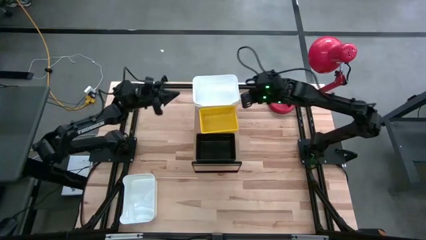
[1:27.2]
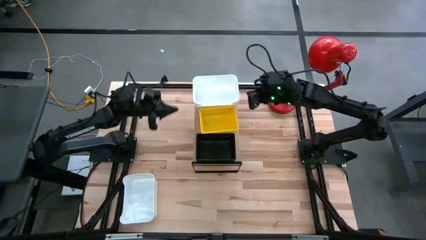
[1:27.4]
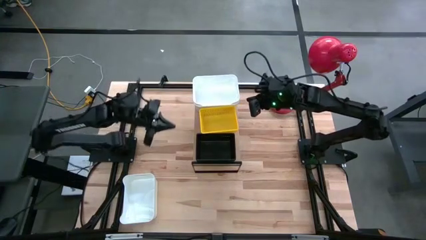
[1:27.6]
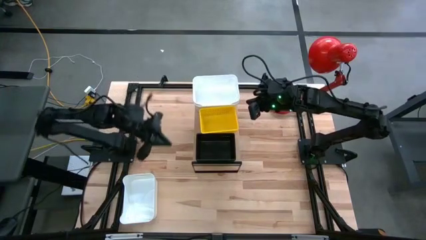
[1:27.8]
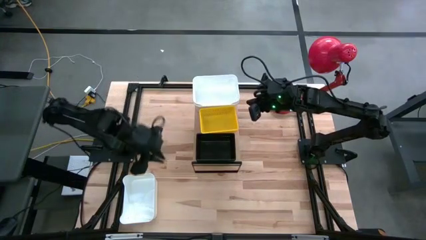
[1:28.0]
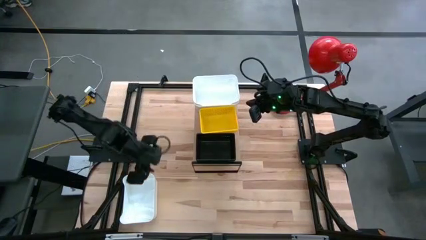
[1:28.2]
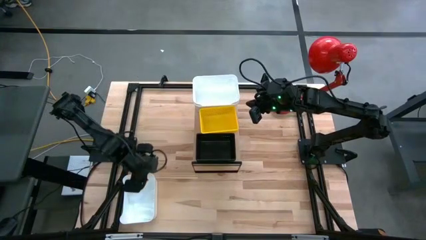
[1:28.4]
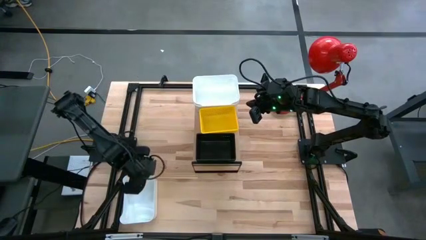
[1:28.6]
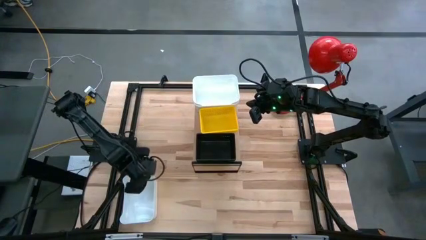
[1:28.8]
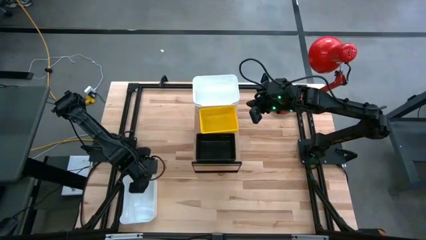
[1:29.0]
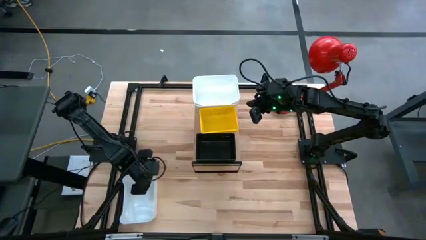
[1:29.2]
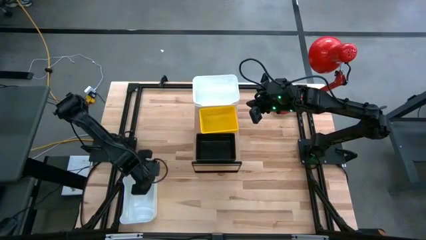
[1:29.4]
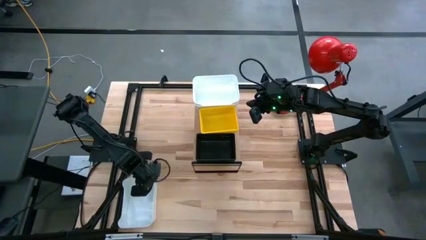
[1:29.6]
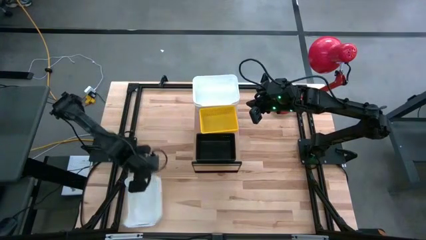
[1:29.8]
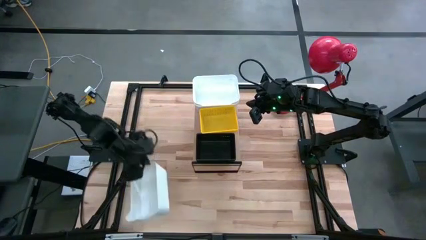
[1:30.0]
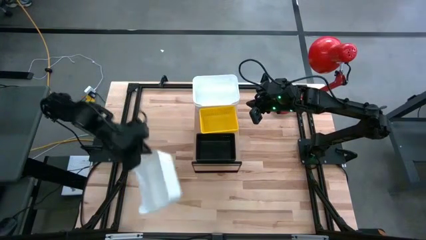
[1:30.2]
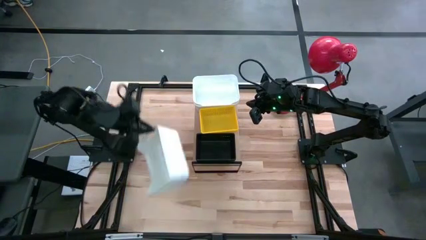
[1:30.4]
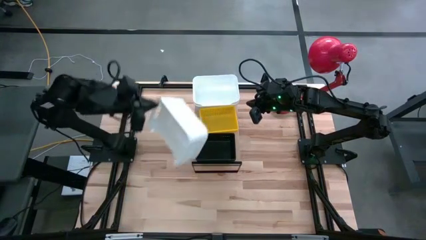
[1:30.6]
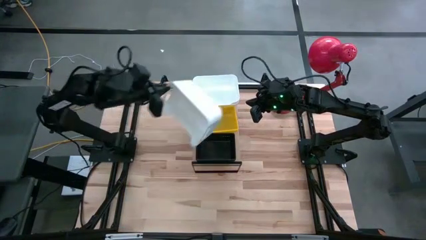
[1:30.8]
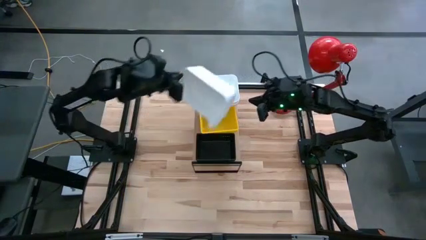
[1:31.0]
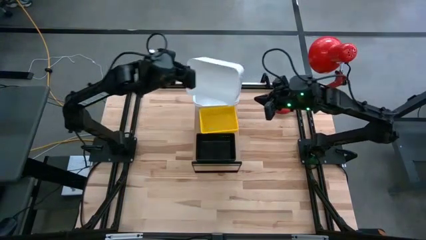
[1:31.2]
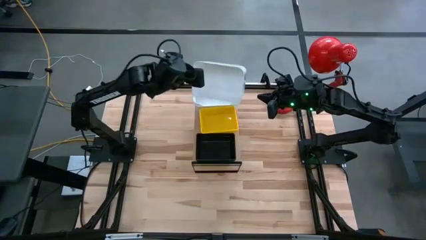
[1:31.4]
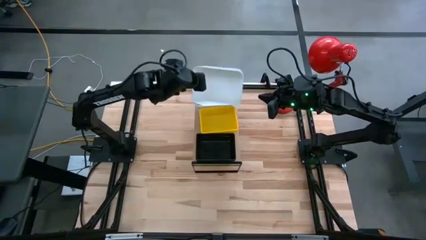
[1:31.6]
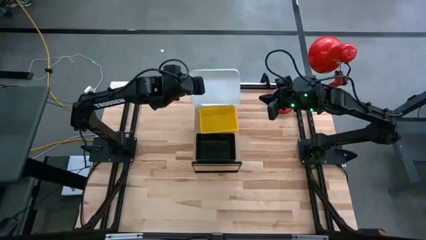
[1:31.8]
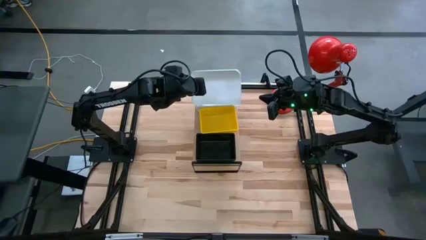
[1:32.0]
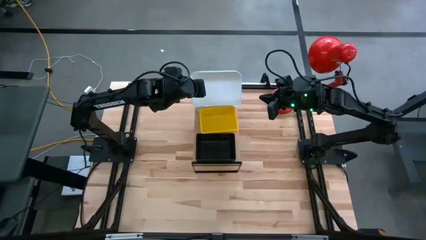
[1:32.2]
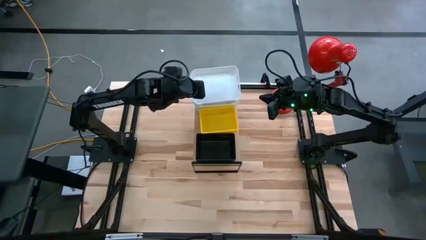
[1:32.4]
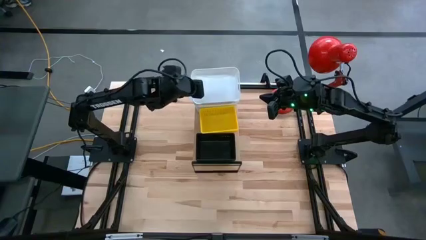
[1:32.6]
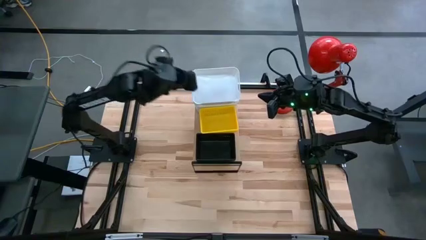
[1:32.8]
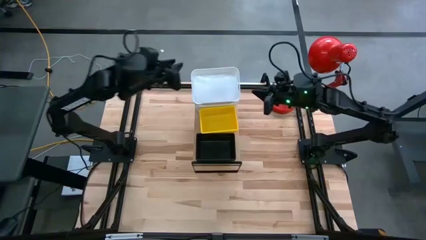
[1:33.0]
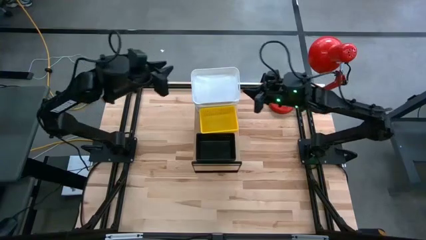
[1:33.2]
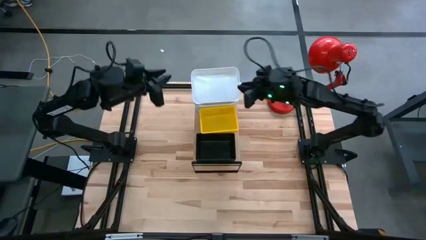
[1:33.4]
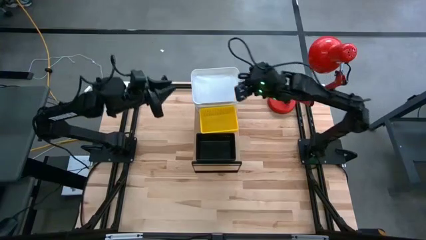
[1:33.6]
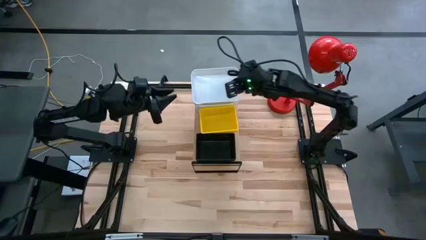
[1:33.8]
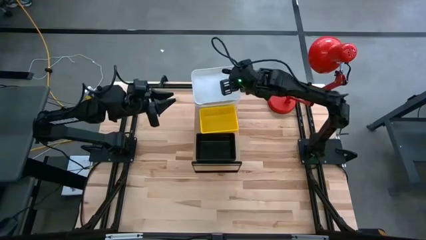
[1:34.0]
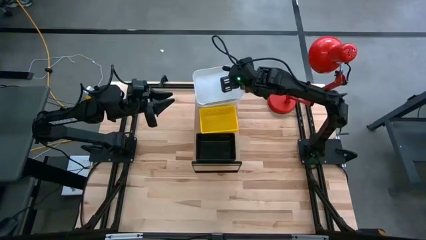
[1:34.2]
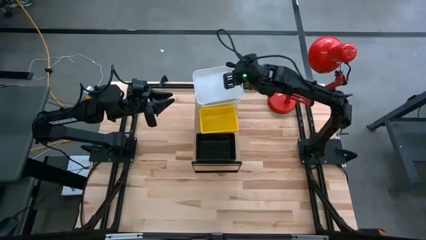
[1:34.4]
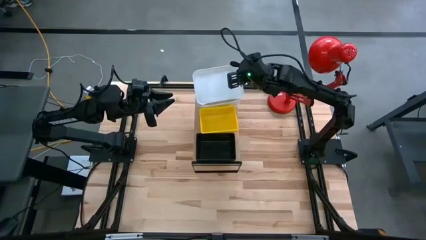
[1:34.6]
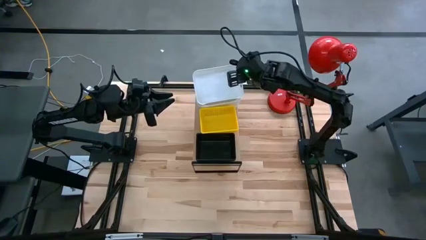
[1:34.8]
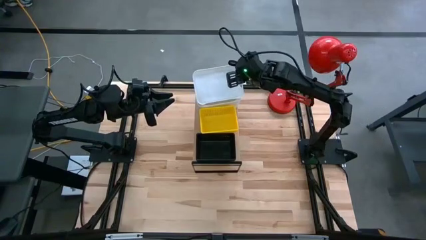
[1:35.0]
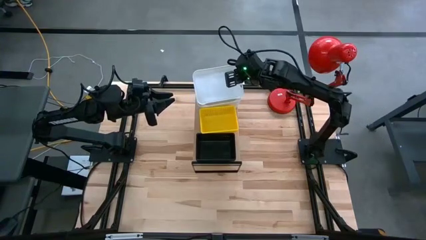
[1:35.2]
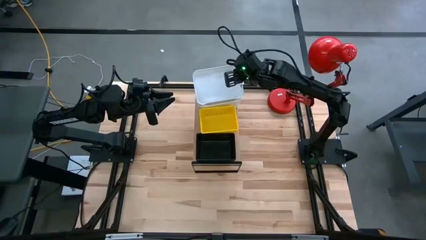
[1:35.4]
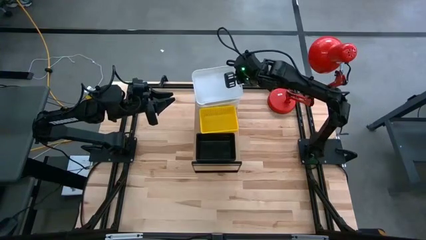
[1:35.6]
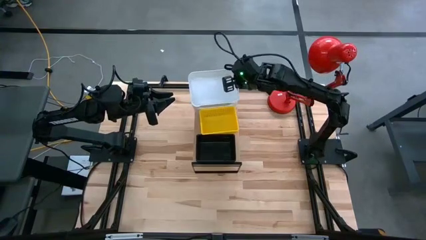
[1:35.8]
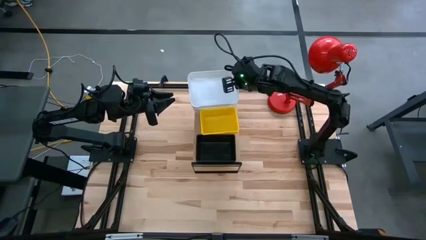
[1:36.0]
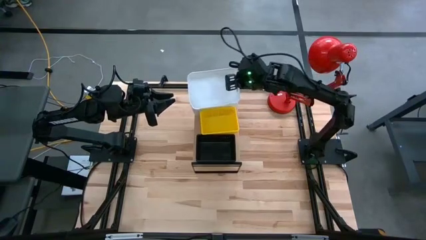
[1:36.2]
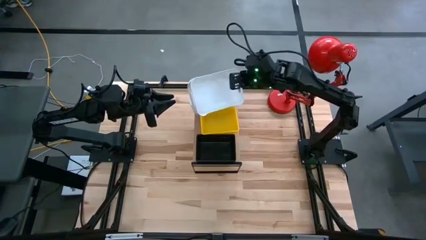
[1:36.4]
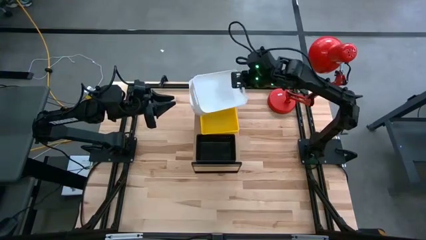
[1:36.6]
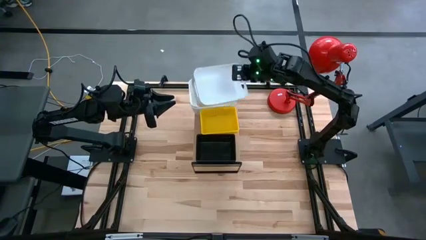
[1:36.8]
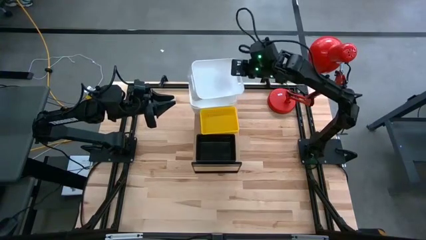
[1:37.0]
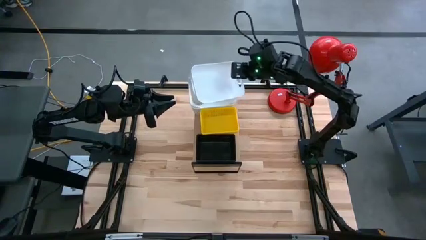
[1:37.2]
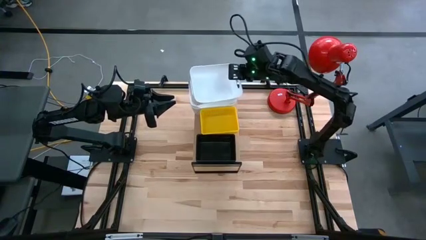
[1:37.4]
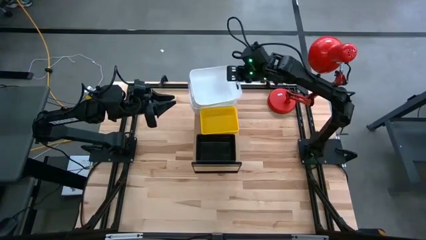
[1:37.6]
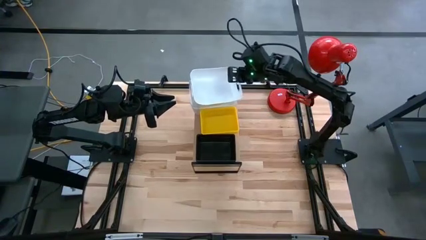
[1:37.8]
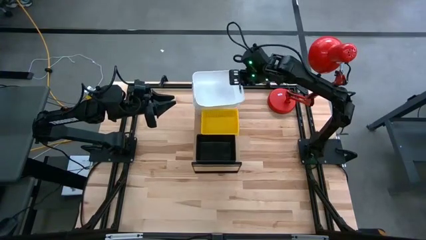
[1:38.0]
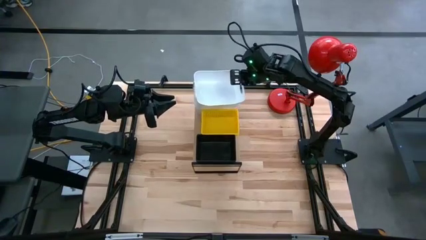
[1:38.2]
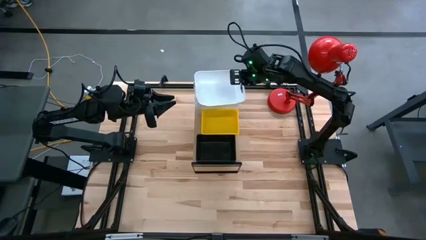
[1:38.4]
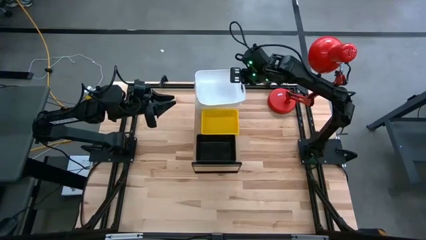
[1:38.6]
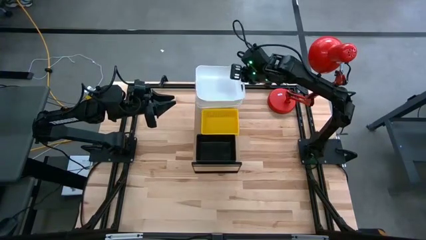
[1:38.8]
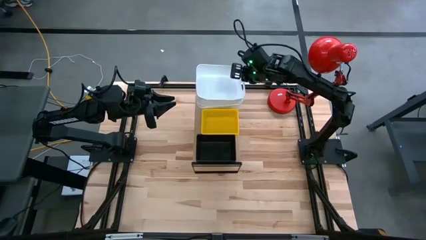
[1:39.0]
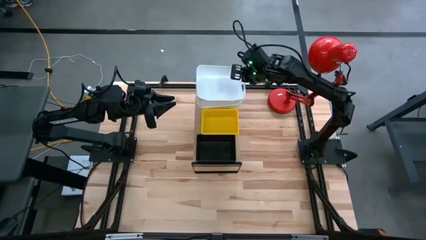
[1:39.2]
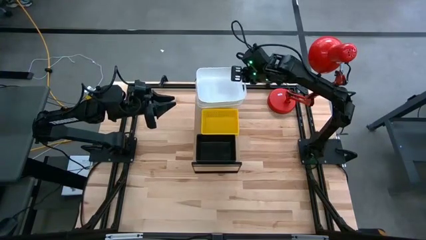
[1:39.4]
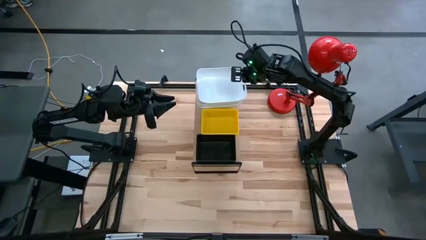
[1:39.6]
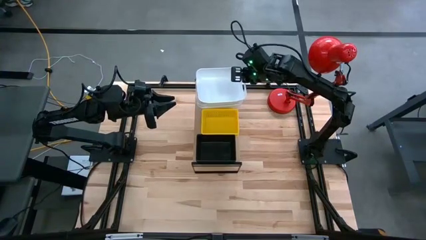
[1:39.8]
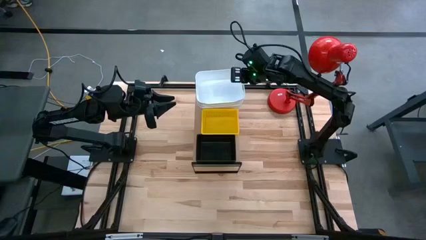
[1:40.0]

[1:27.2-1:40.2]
Task: Stack baskets on shelf by color
Stack the white bin on top of the white bins on the shelf

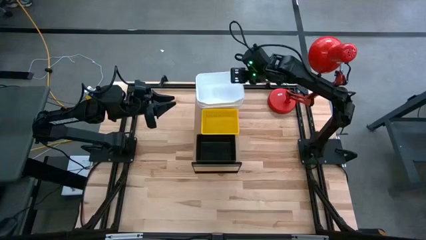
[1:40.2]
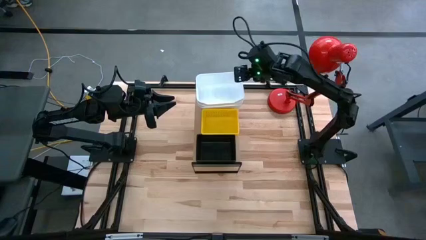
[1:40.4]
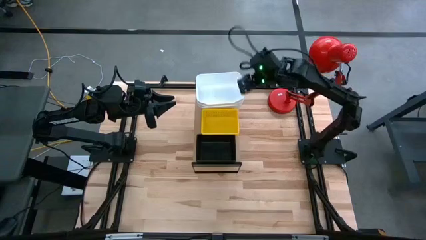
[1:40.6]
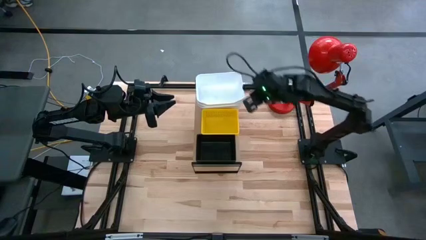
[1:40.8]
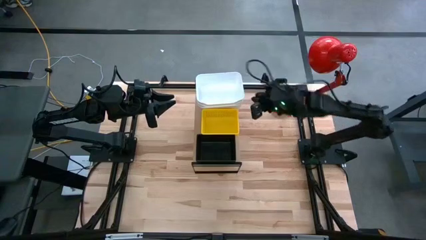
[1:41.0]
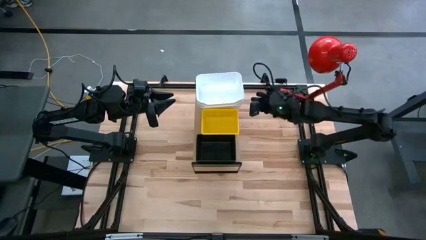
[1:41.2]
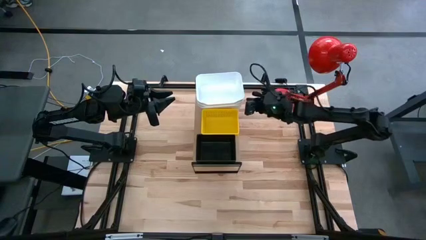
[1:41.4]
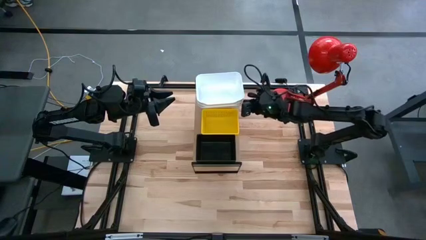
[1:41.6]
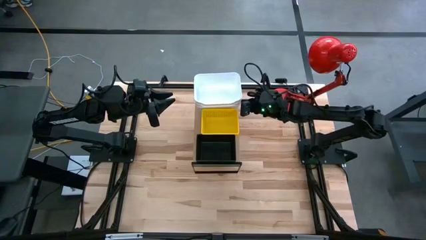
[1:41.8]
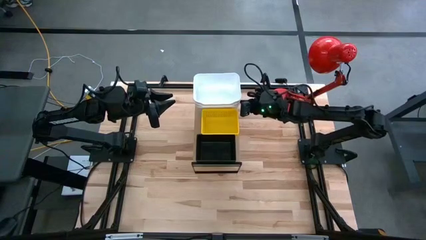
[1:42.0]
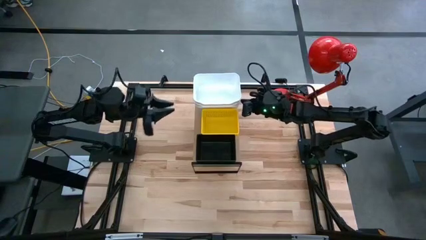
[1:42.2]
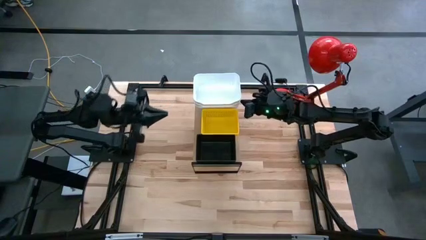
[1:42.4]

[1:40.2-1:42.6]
Adjust the white bins on the shelf
